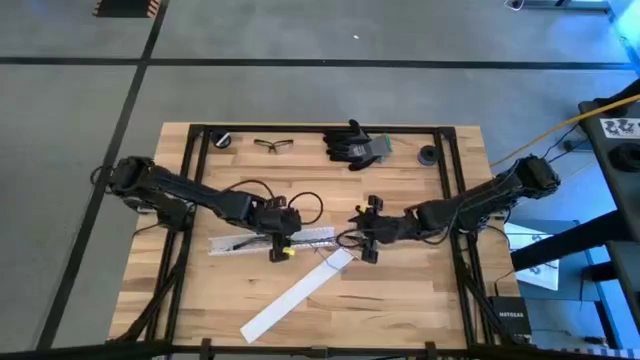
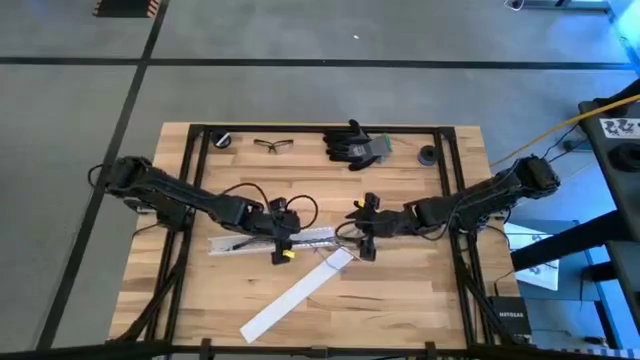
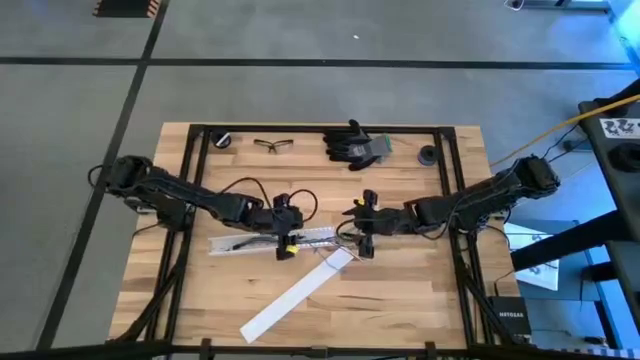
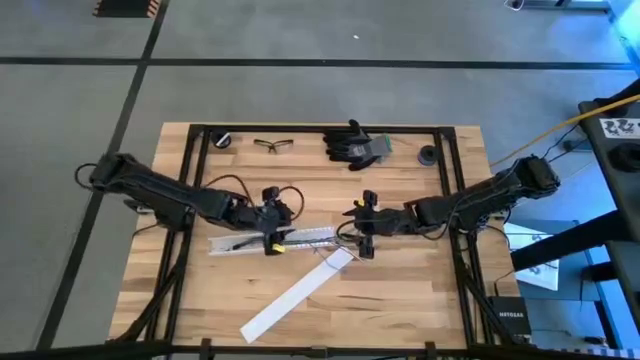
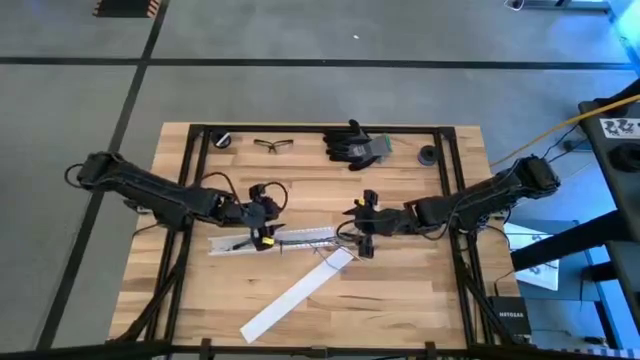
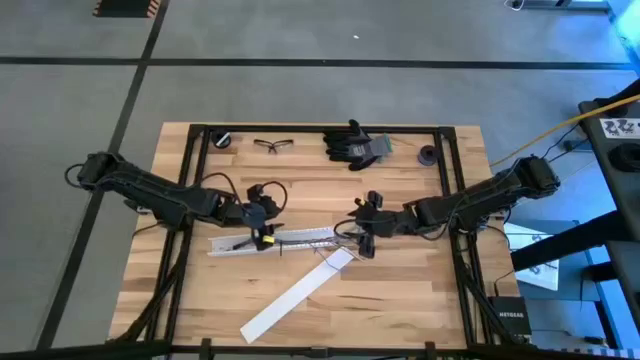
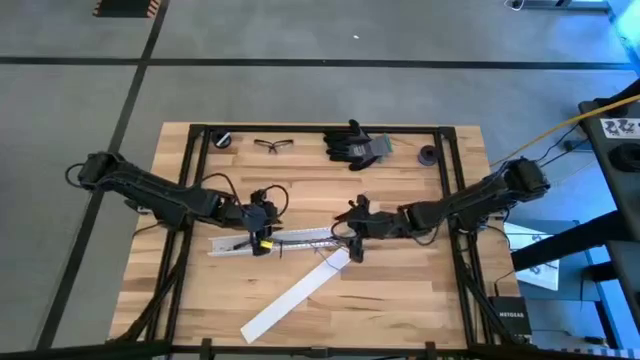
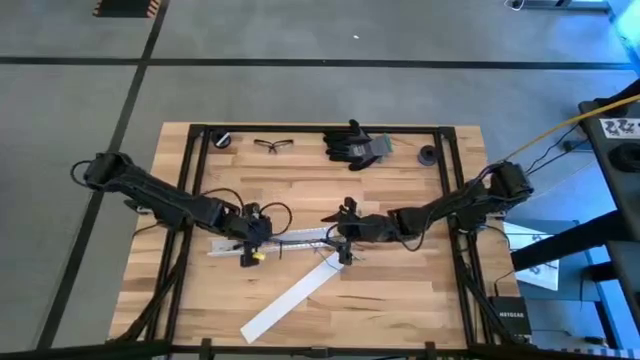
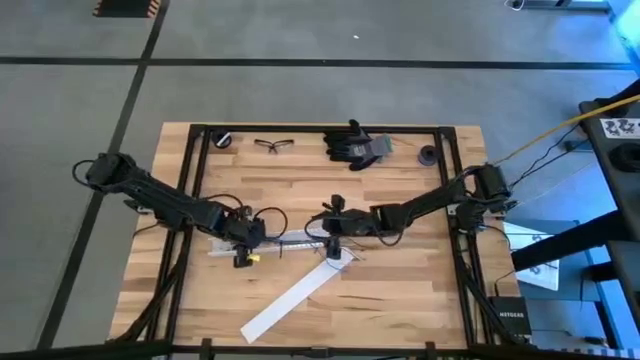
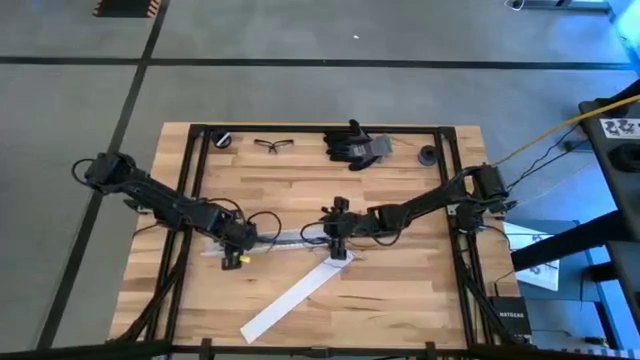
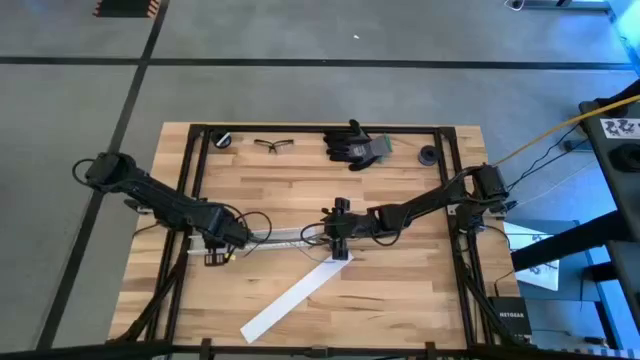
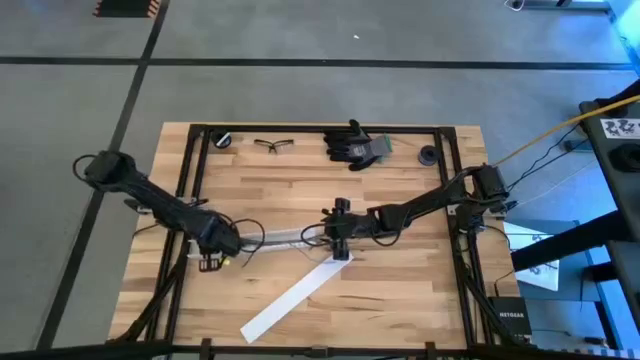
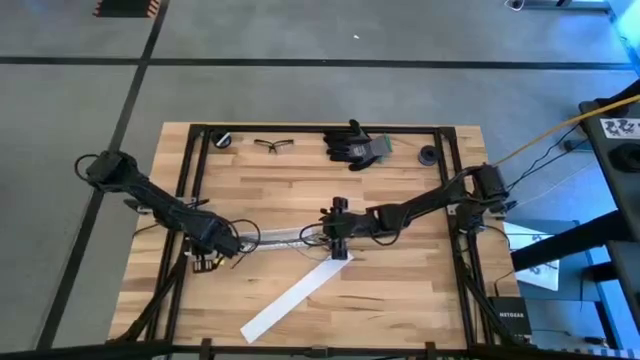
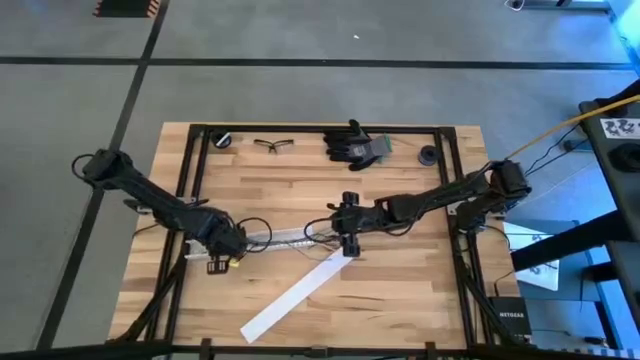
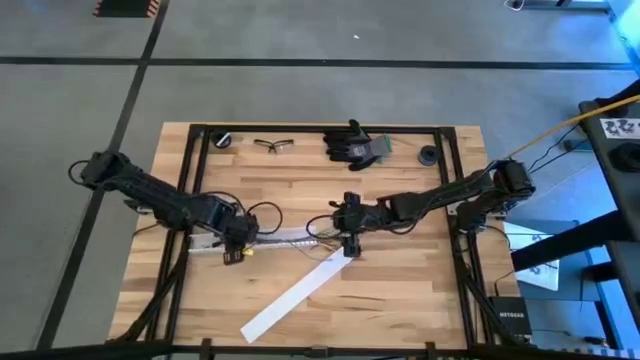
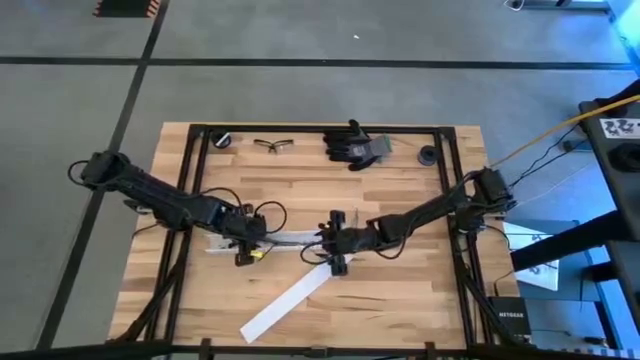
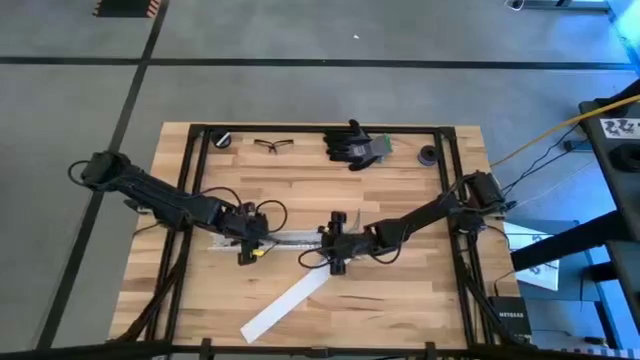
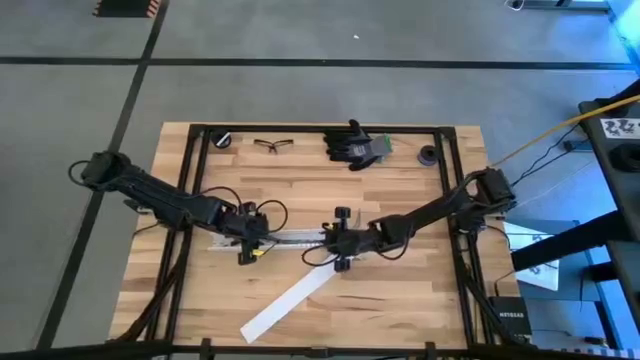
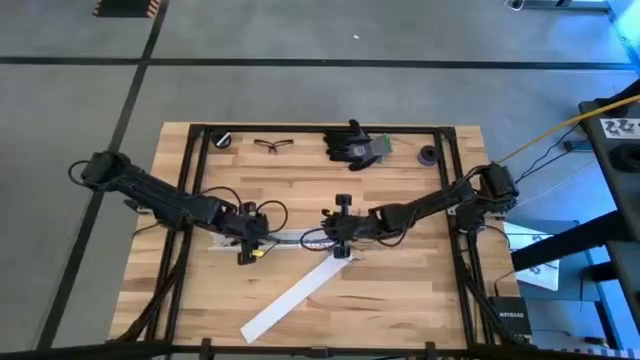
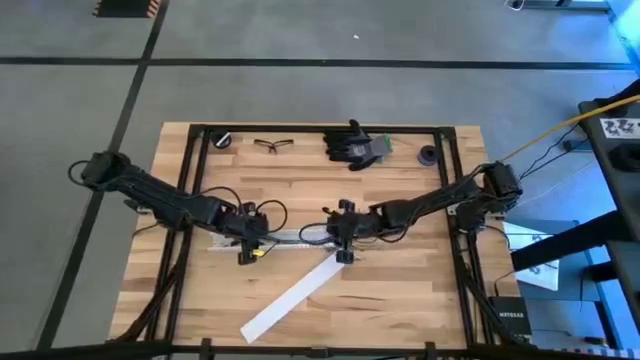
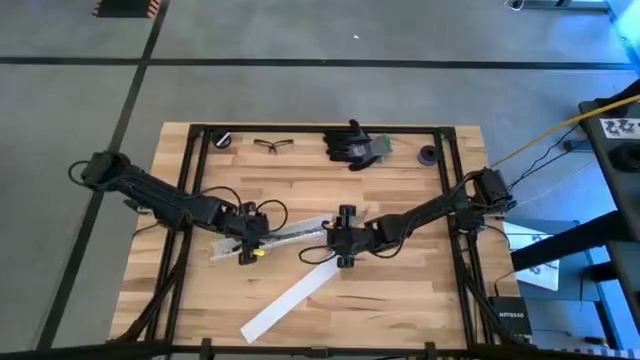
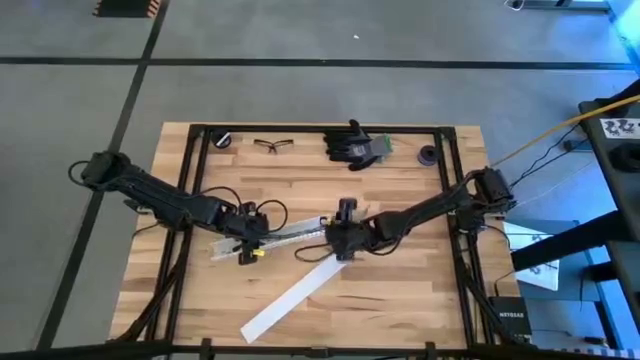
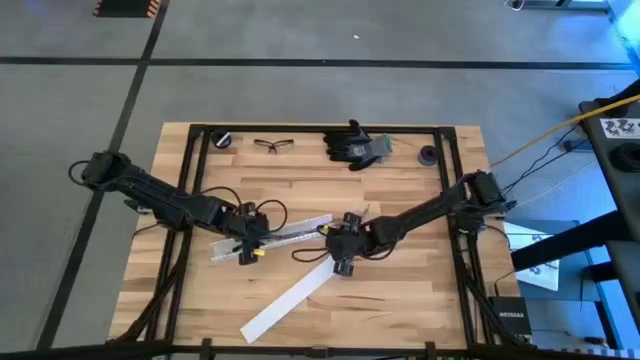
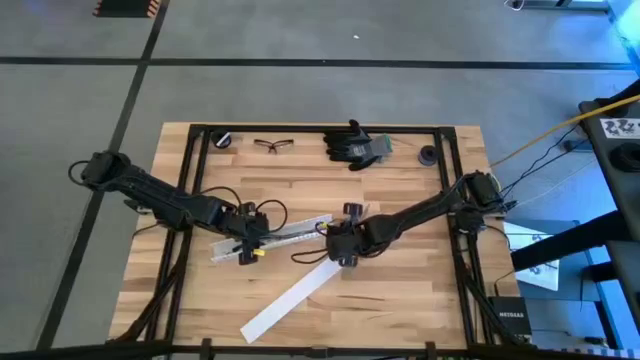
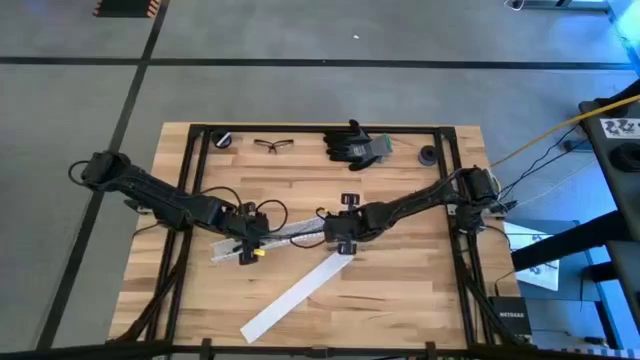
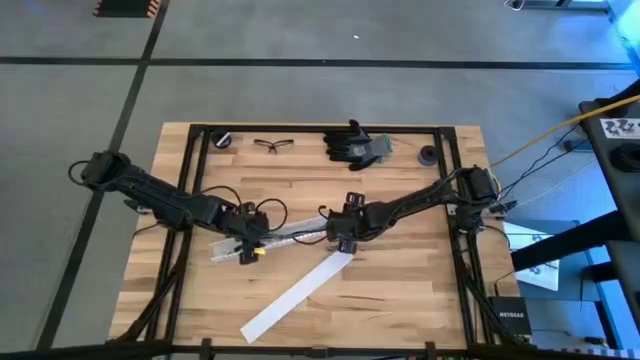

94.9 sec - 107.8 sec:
Task: Ziptie cables
Adjust the ziptied cables

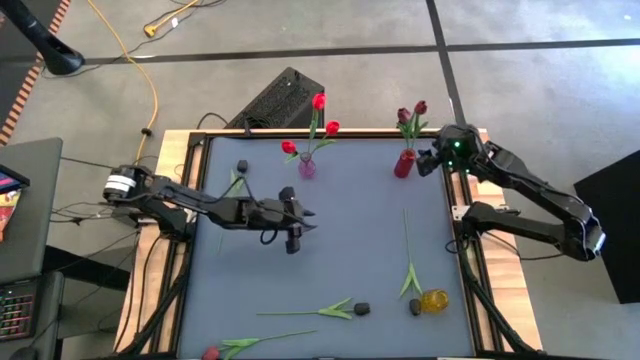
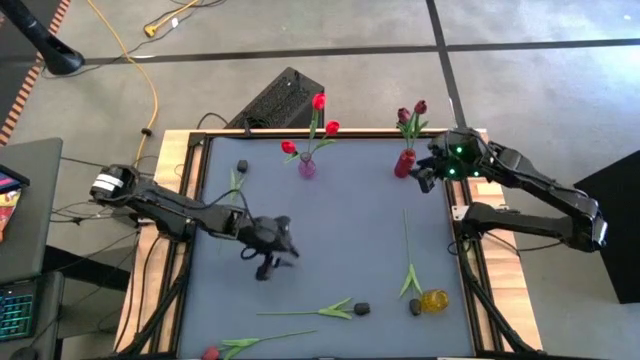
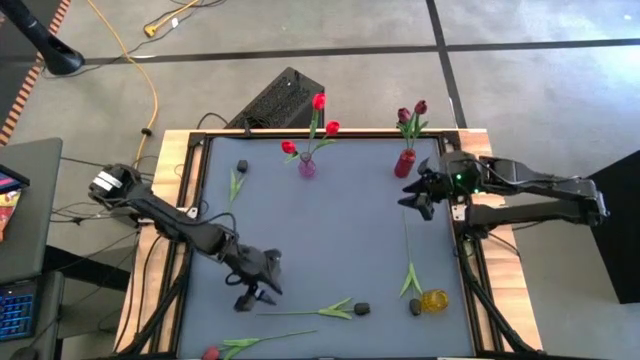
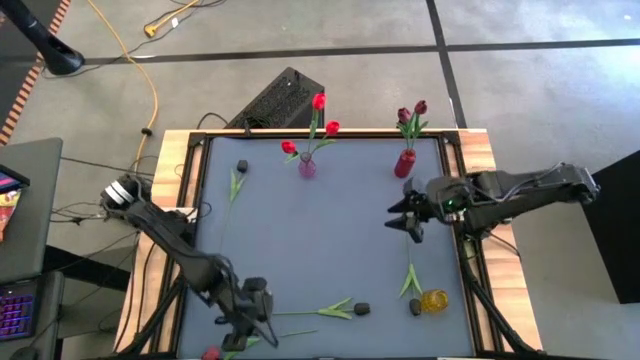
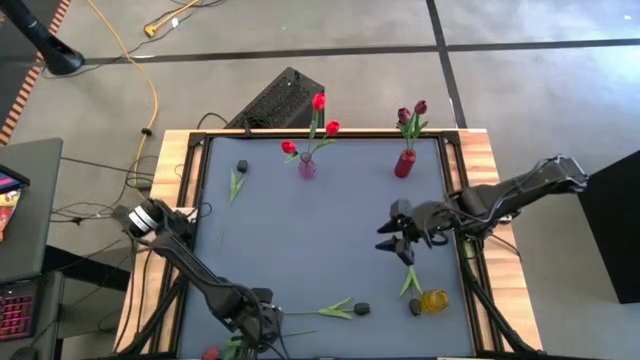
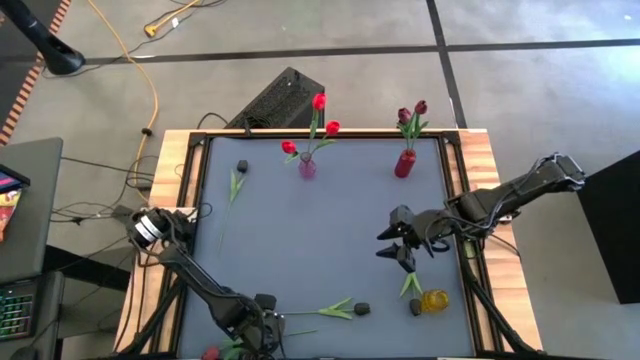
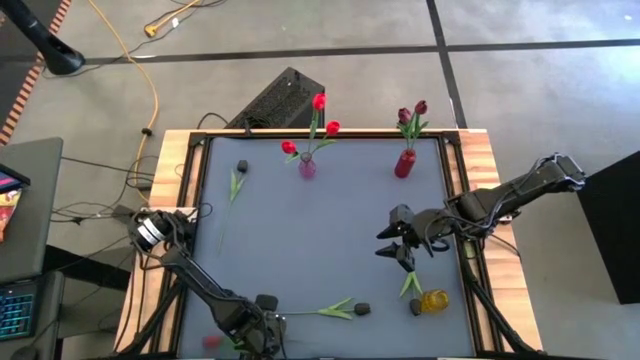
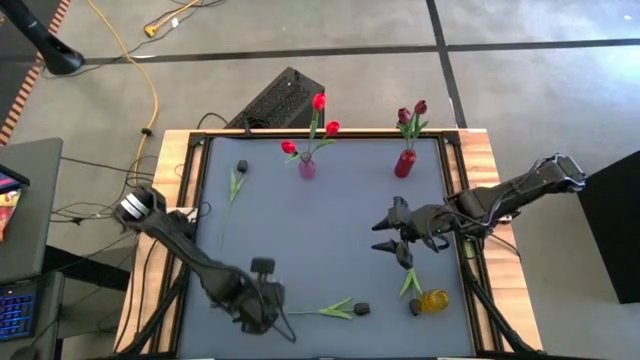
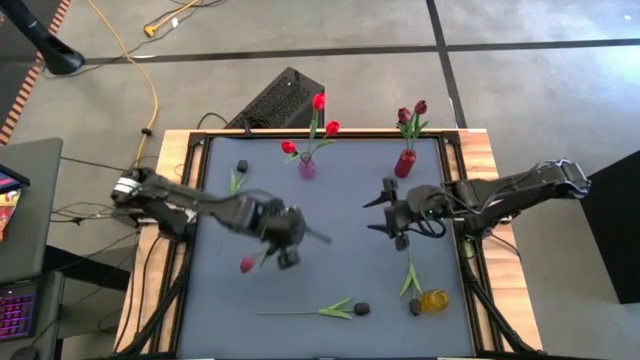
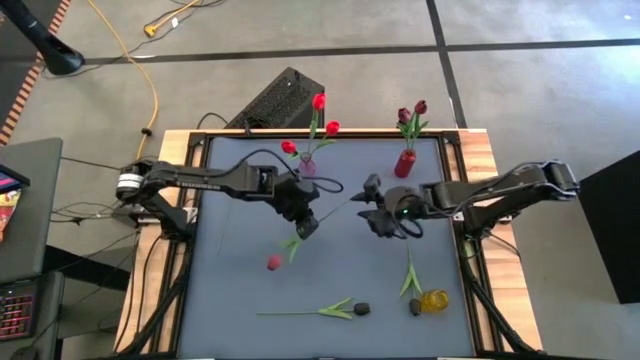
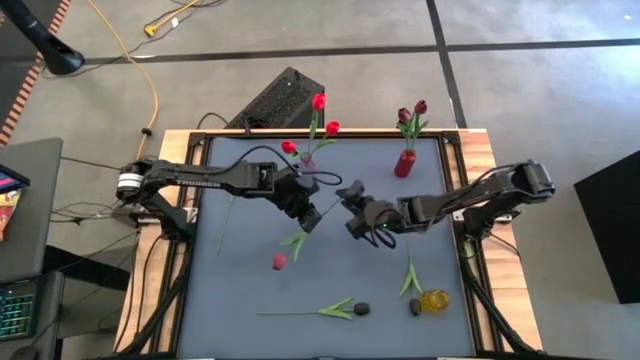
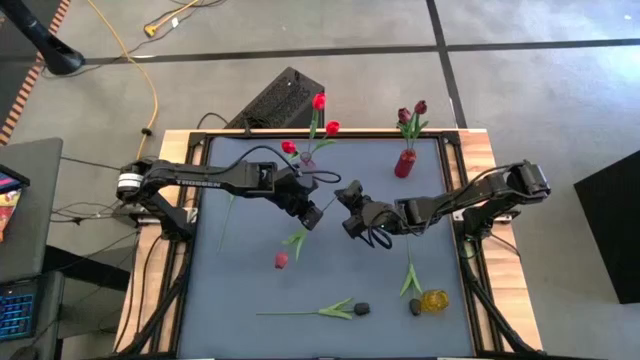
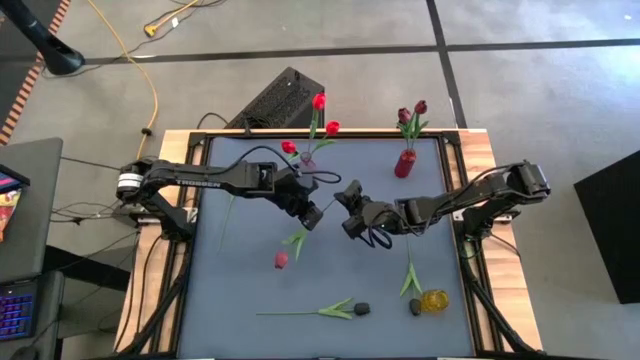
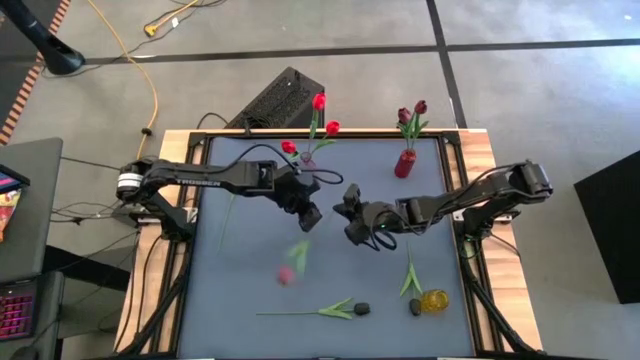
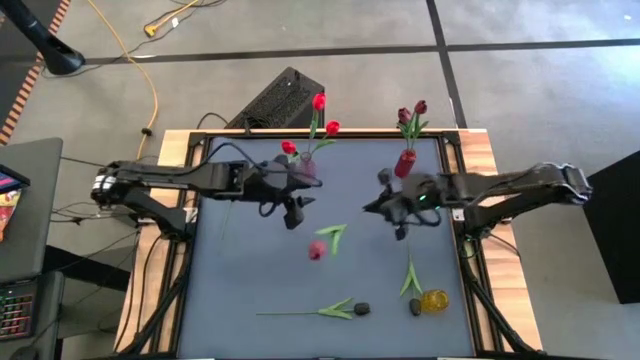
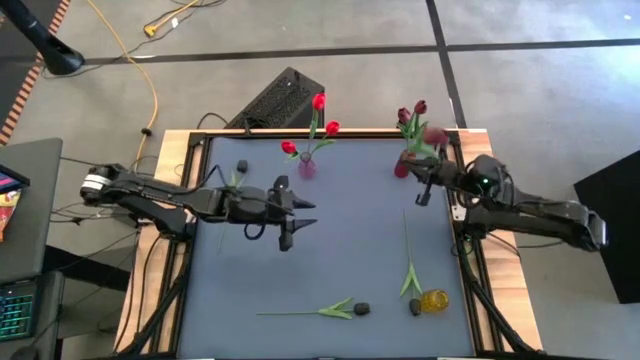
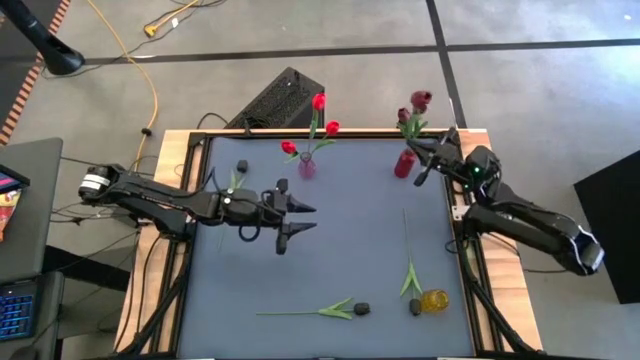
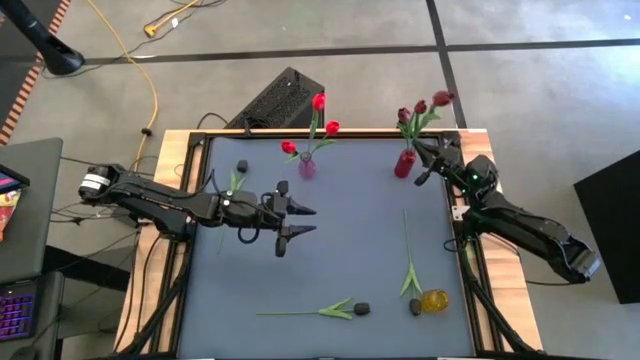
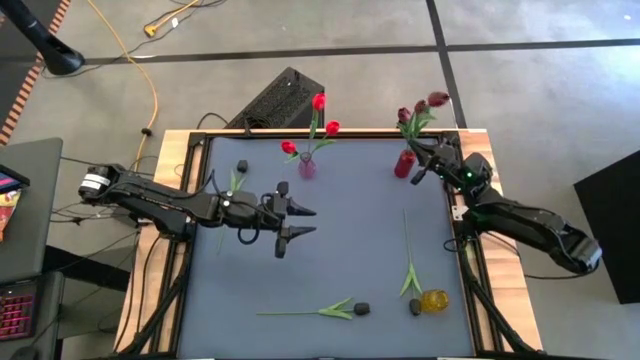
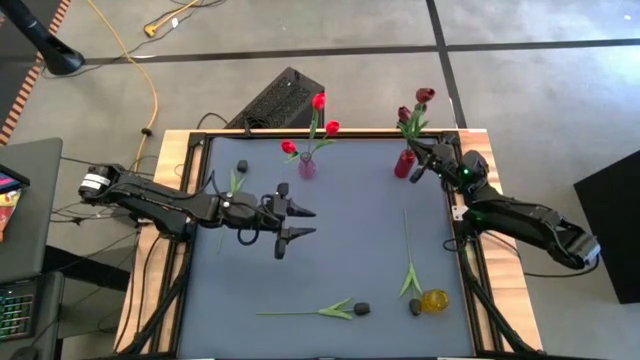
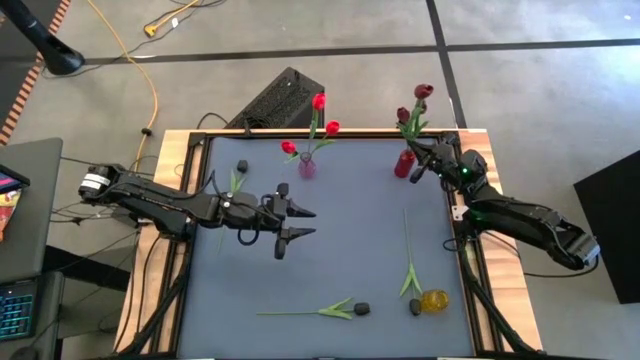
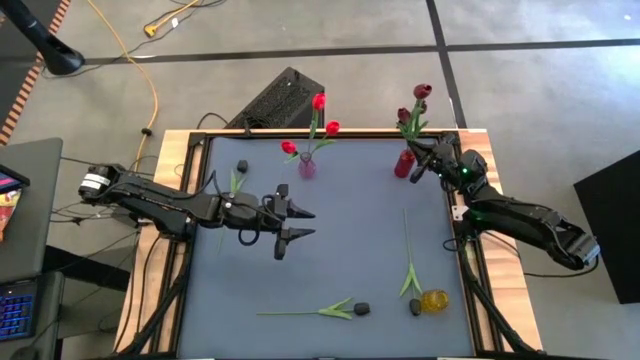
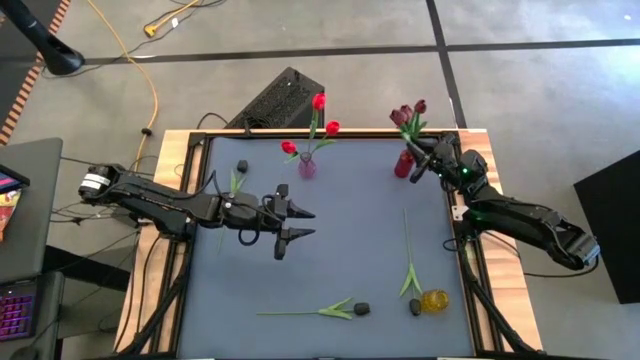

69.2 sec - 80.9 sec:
Task: Sort flowers into vase by color
Put the red flower into the red vase
